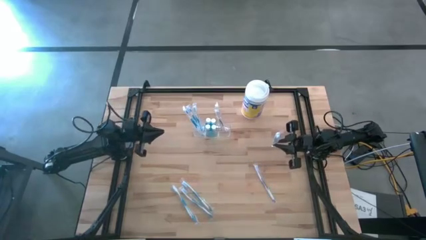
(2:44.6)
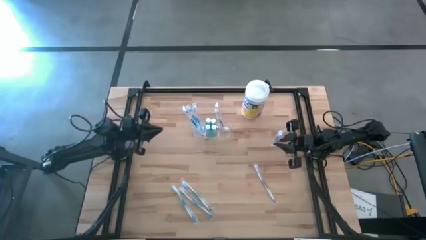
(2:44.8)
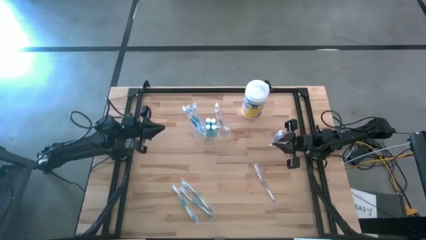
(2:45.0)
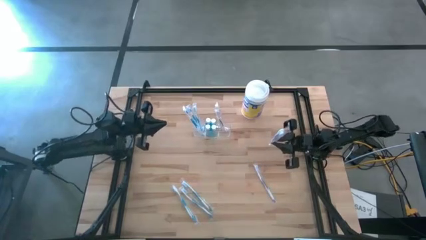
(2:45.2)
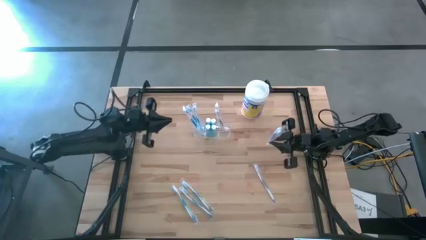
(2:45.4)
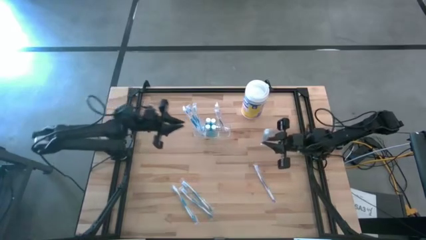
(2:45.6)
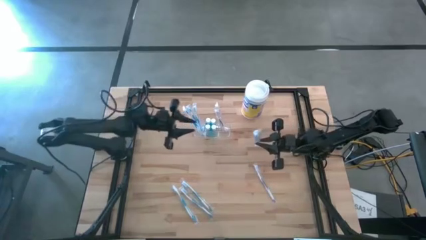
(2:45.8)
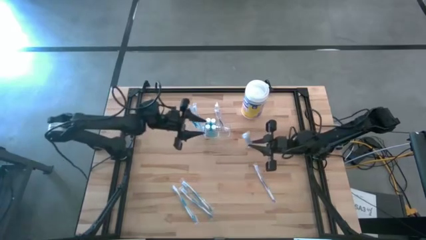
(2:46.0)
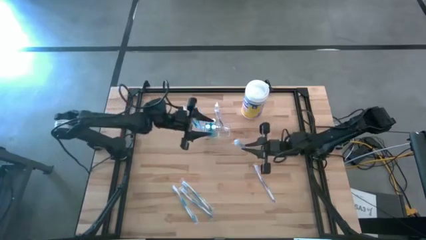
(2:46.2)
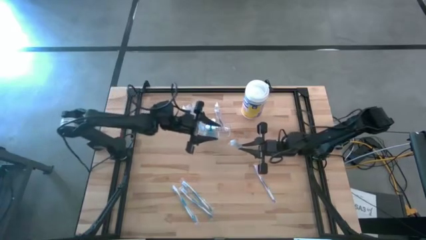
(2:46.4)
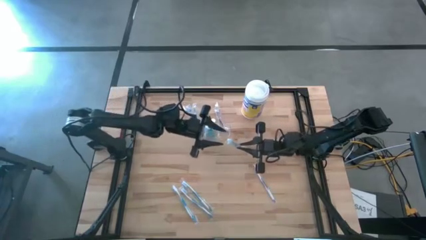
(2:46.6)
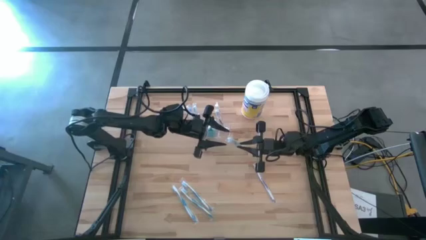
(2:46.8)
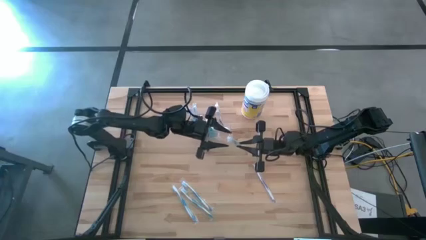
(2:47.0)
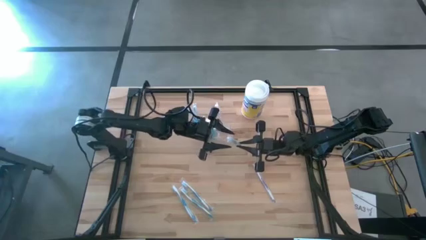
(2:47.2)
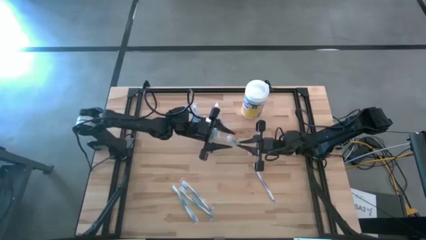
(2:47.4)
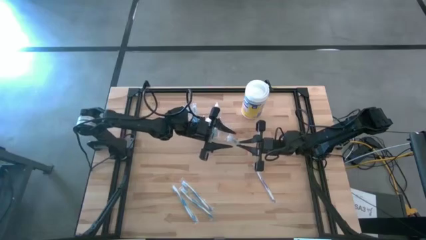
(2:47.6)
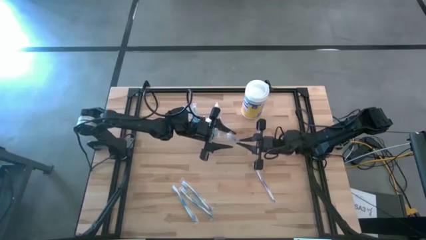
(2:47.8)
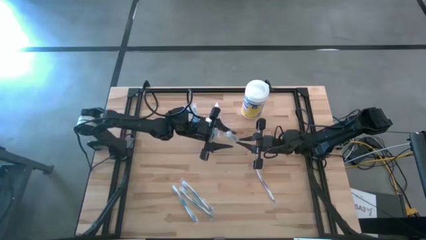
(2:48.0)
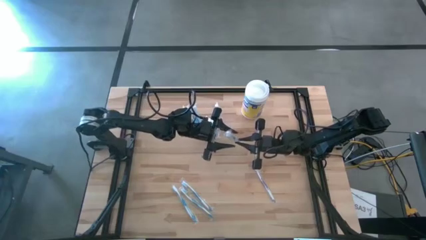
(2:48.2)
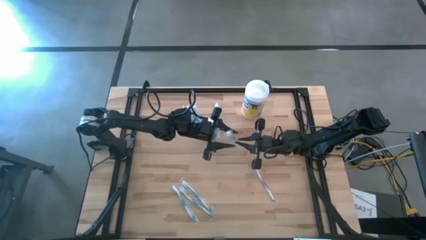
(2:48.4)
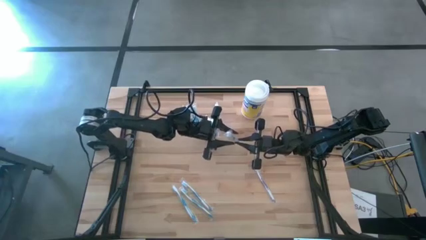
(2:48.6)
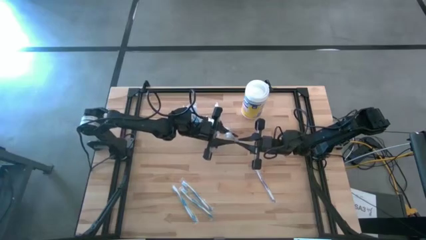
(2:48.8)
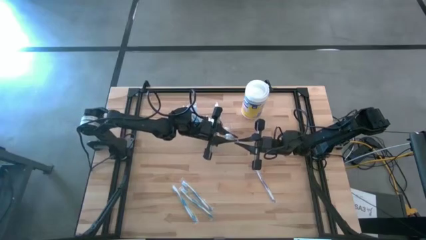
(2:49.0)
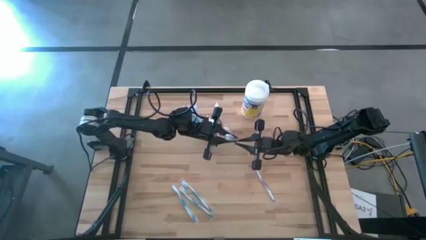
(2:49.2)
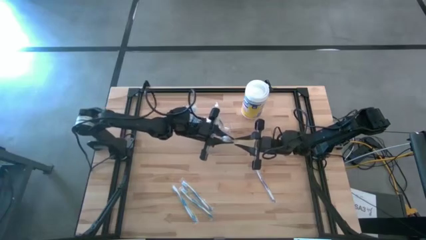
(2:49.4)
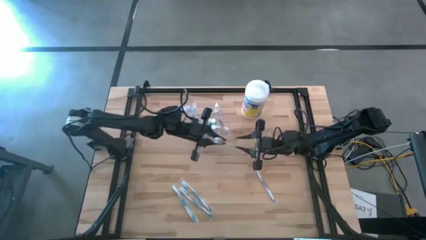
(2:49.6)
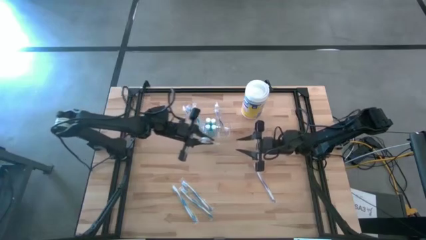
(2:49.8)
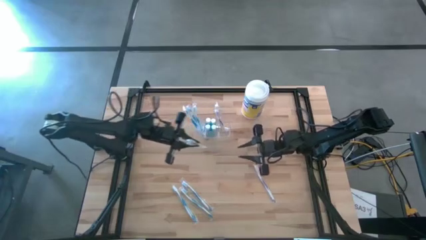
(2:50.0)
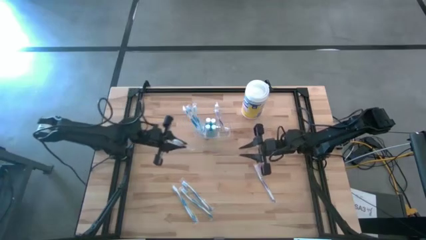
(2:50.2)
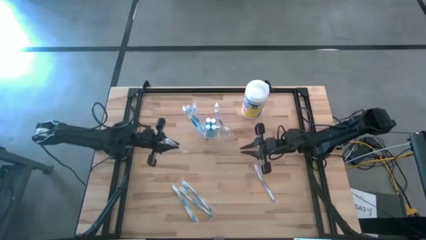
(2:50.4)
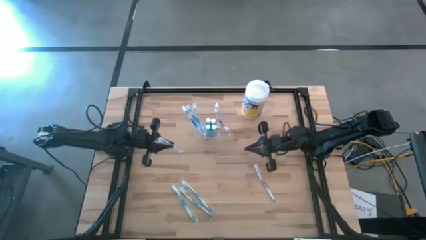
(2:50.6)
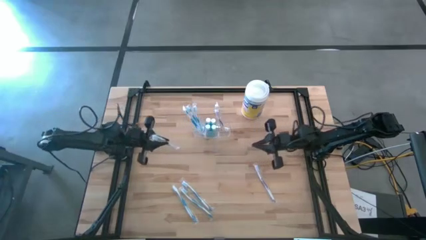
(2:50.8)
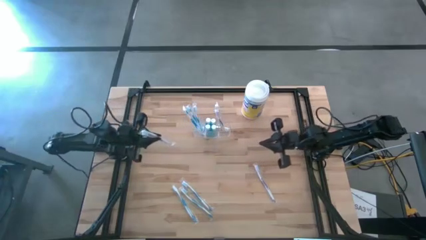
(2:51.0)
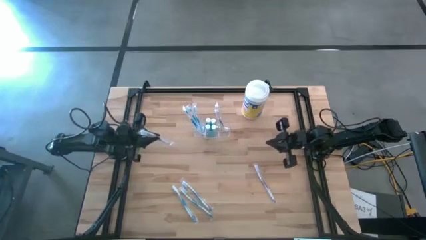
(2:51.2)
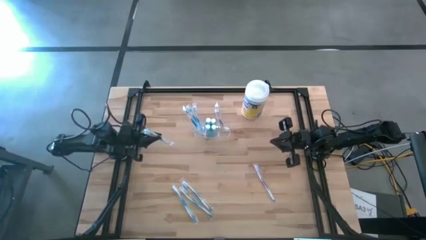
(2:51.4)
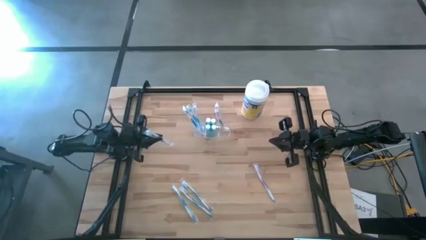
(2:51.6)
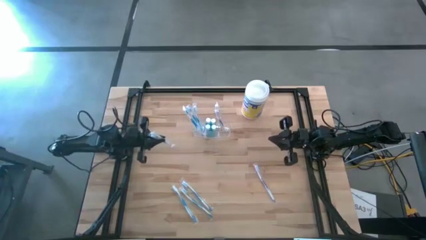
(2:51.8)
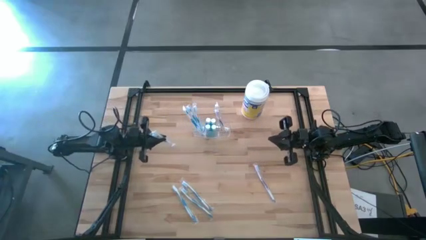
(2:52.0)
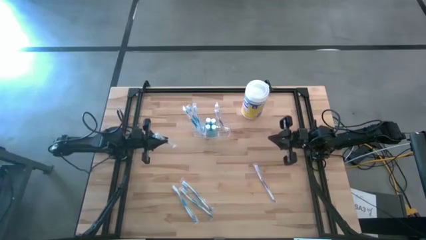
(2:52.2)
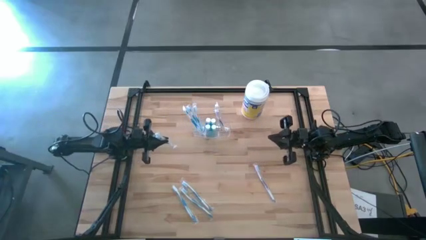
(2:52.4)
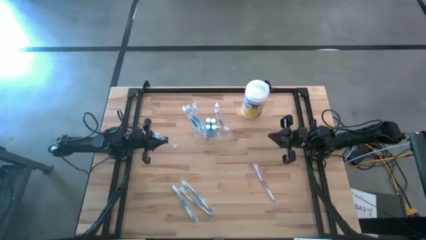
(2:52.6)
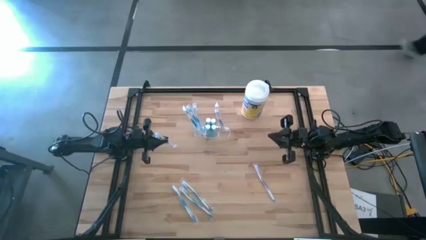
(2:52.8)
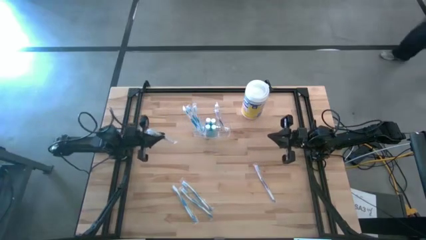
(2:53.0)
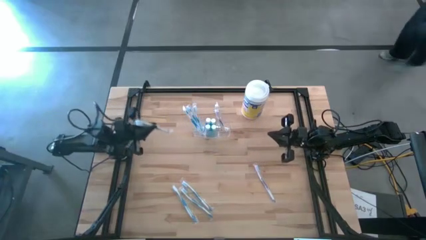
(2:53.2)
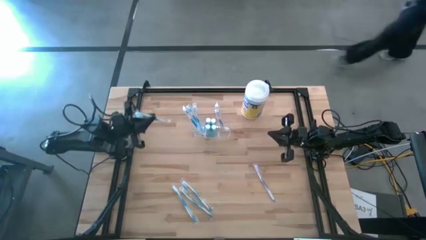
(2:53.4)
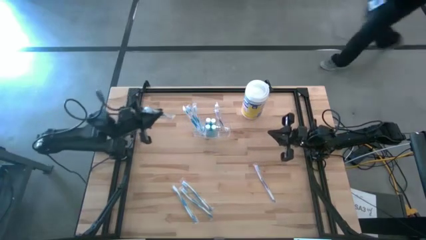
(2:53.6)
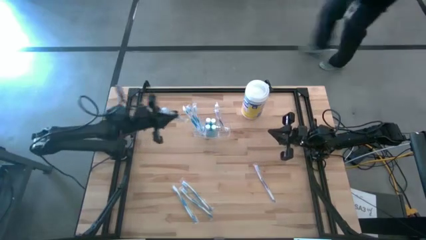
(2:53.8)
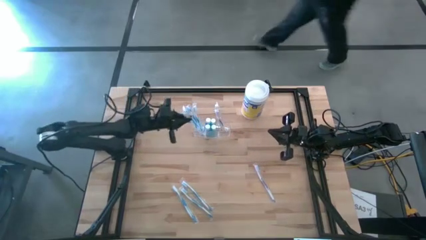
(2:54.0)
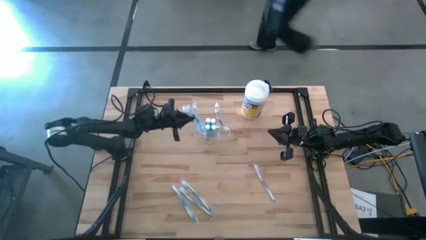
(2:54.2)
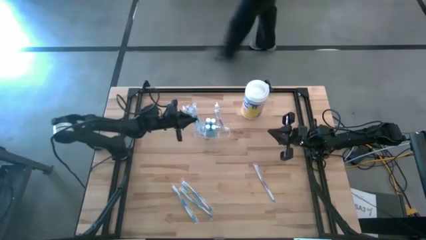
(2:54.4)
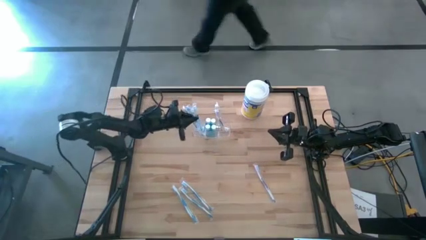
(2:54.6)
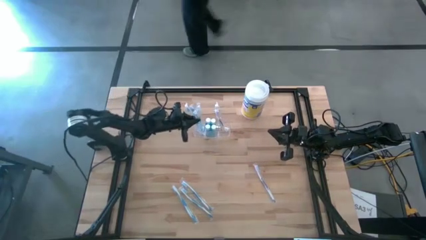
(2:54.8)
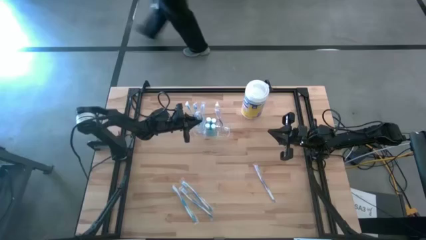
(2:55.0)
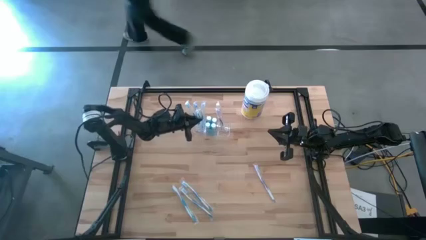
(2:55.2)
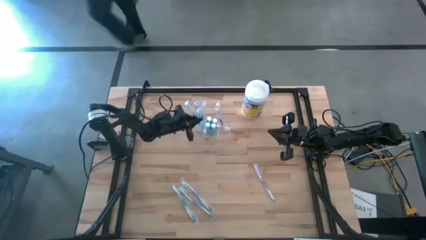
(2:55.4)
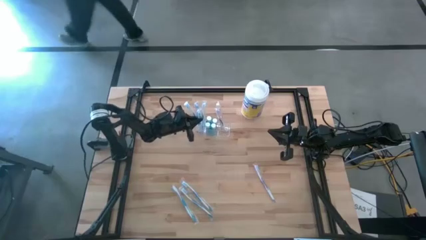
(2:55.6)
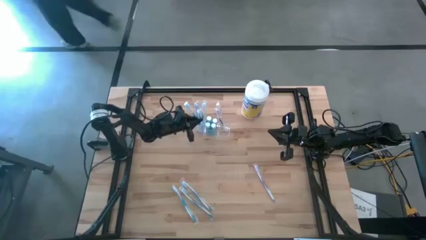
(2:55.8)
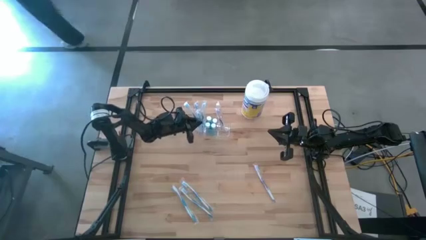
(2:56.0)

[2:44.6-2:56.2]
Task: Pick & Place toothbrushing station
Put the blue toothbrush into the transparent organizer

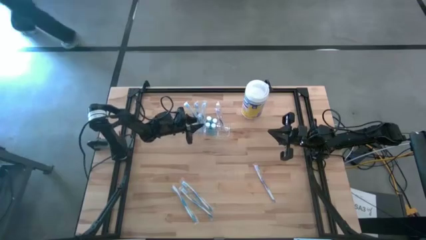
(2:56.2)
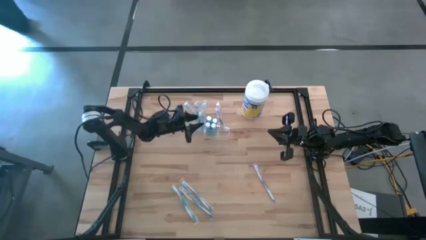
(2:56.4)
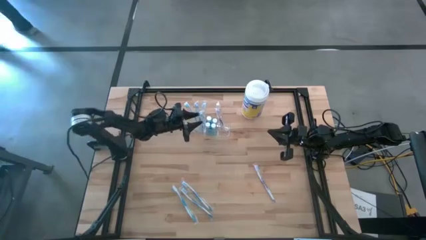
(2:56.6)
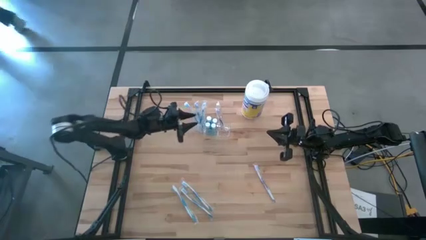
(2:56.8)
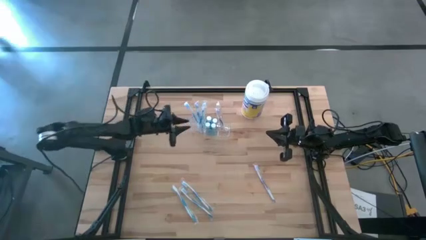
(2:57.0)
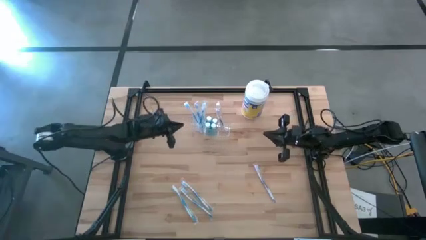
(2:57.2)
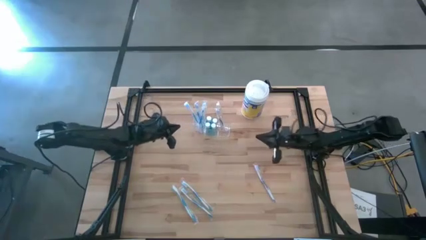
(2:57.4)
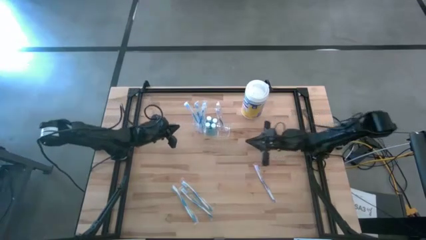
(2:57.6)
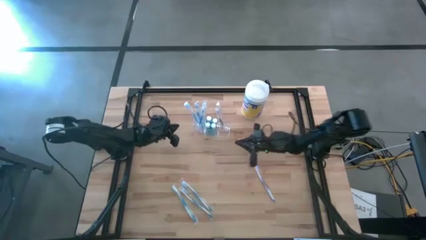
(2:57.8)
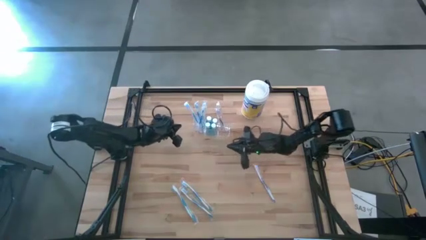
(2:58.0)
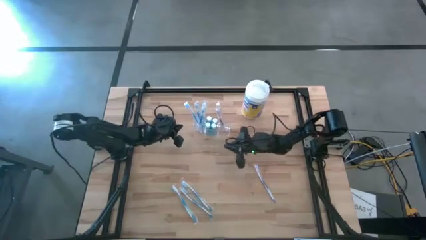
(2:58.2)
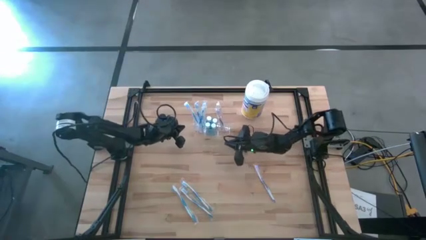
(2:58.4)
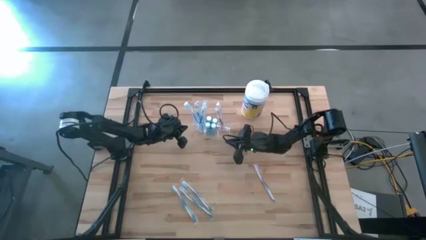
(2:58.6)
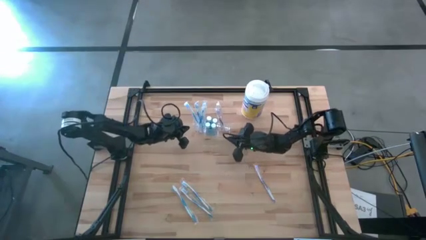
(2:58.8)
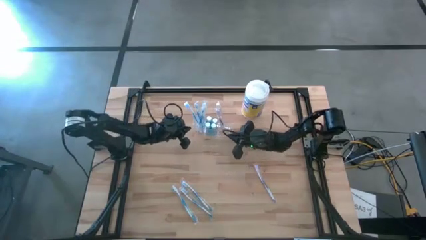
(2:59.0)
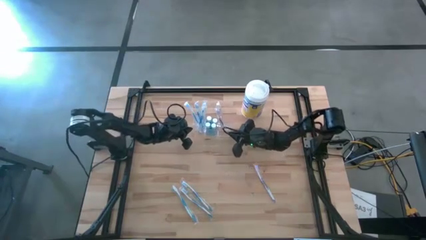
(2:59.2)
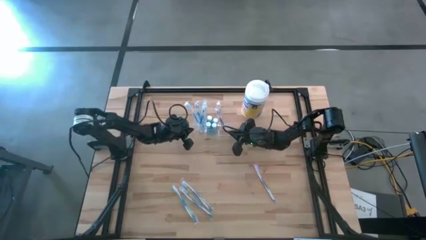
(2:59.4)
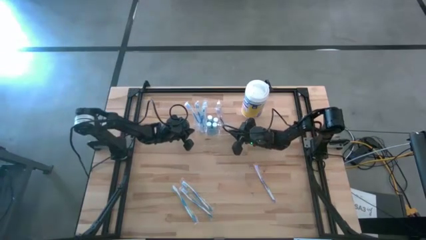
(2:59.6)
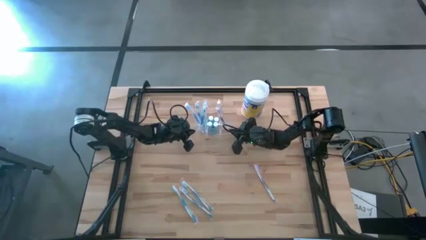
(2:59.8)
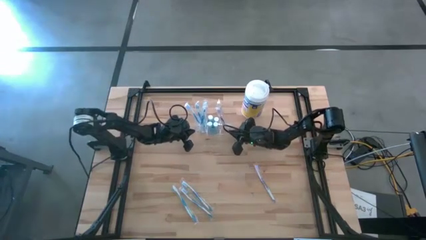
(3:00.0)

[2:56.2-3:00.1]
Adjust the transparent organizer
